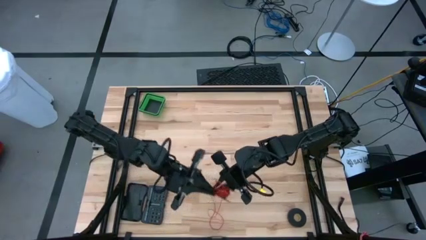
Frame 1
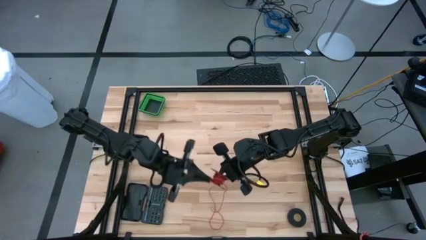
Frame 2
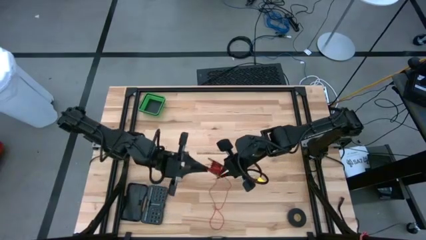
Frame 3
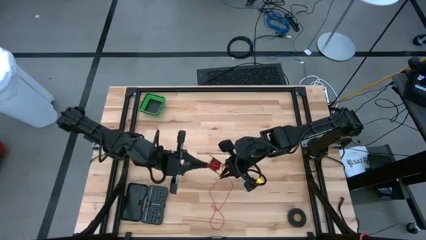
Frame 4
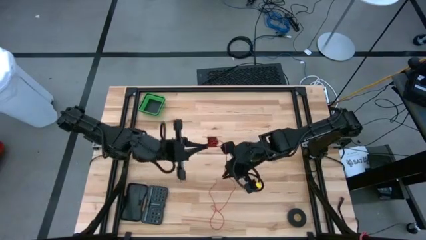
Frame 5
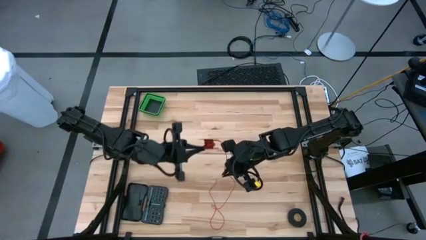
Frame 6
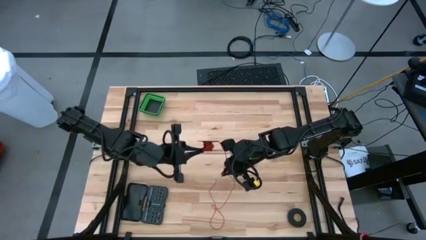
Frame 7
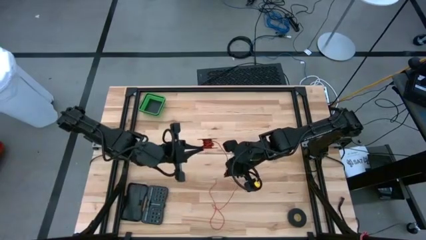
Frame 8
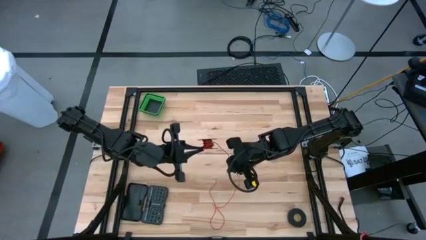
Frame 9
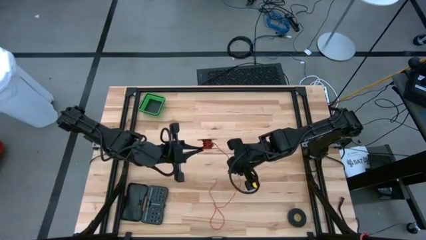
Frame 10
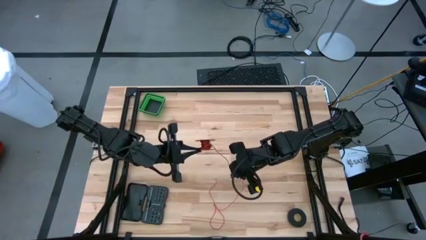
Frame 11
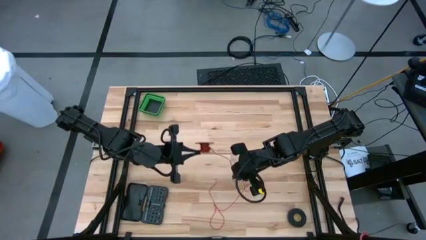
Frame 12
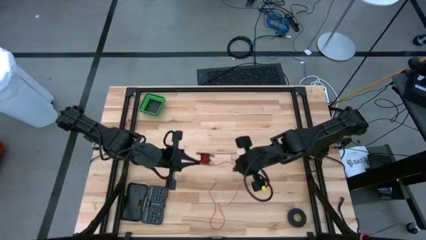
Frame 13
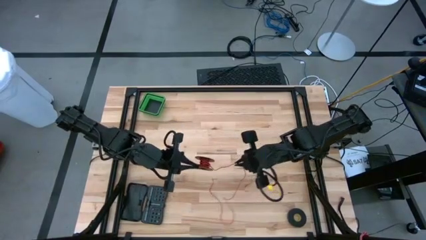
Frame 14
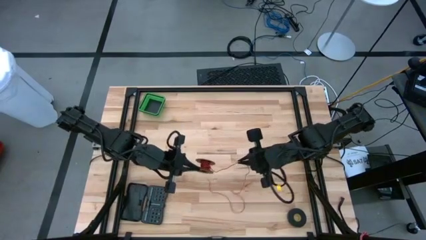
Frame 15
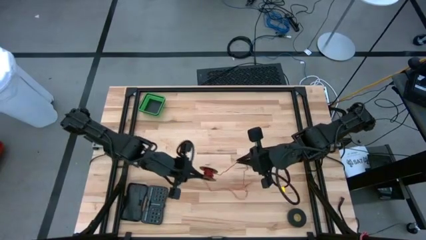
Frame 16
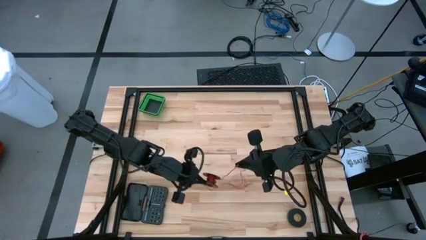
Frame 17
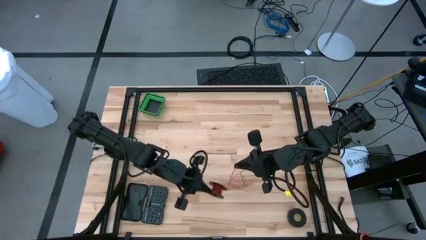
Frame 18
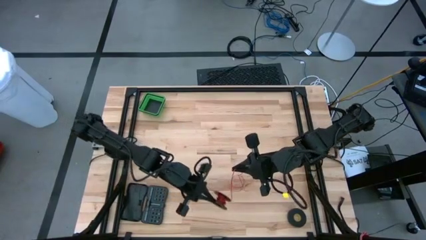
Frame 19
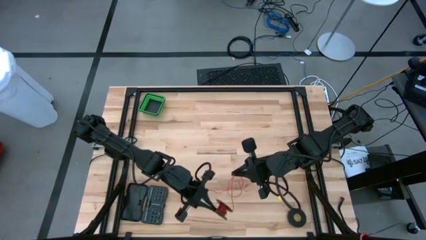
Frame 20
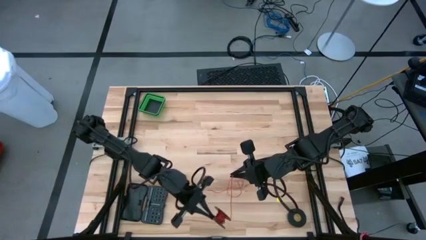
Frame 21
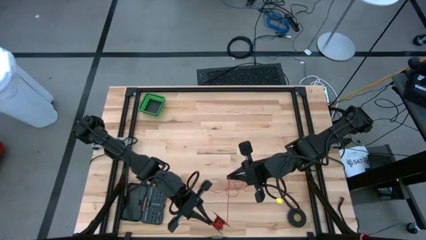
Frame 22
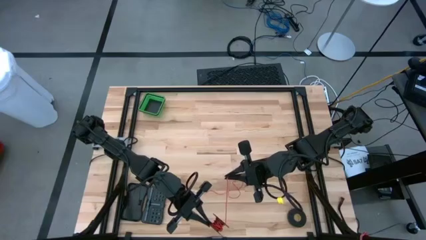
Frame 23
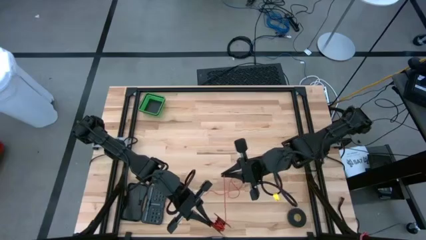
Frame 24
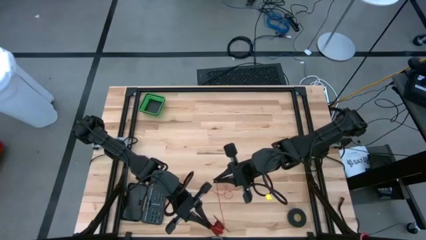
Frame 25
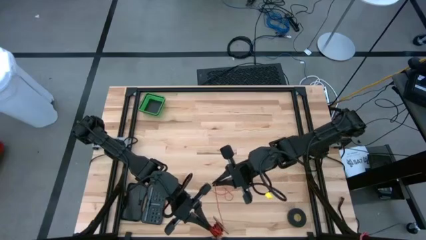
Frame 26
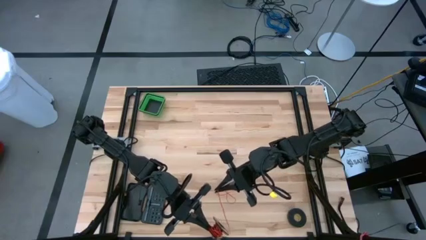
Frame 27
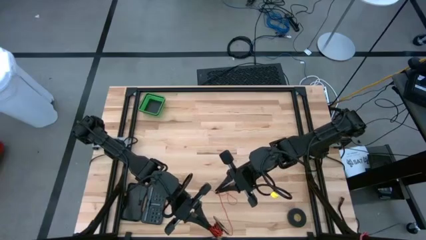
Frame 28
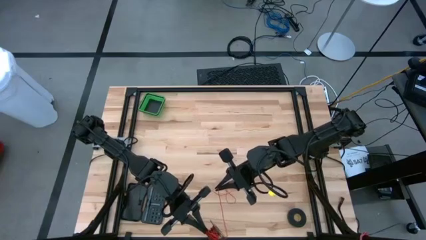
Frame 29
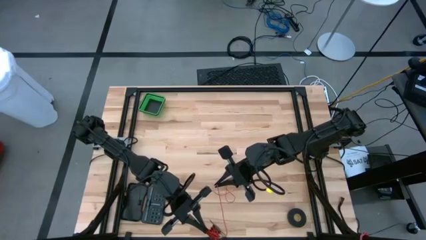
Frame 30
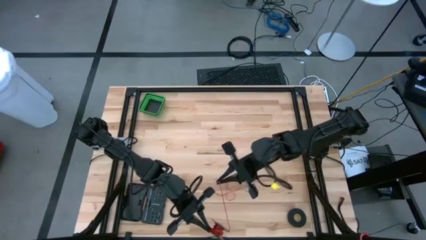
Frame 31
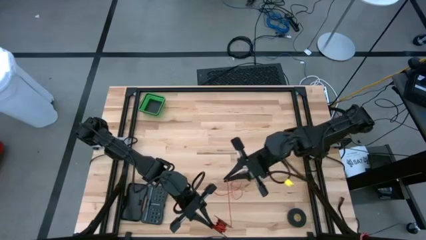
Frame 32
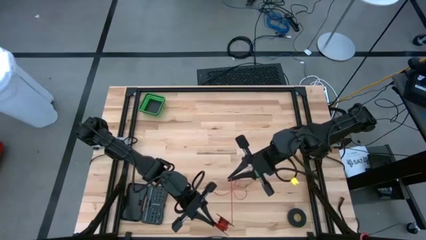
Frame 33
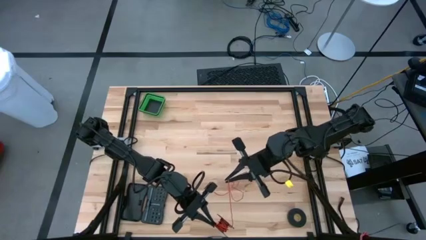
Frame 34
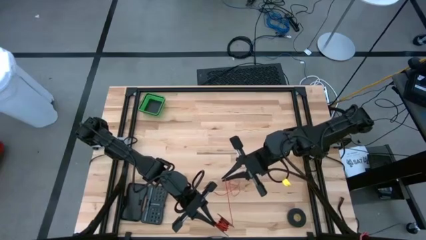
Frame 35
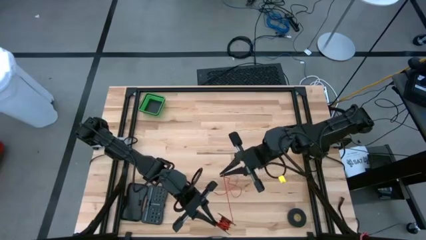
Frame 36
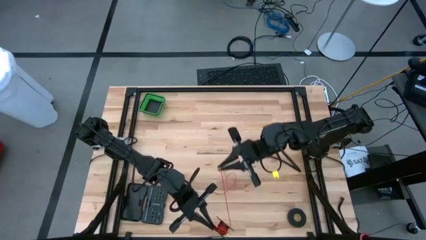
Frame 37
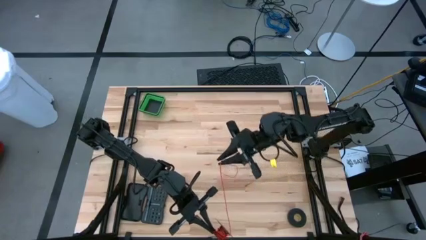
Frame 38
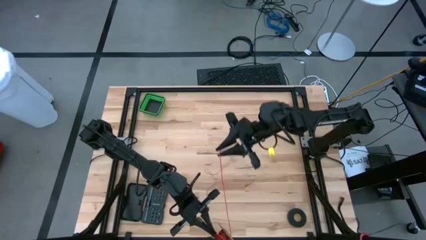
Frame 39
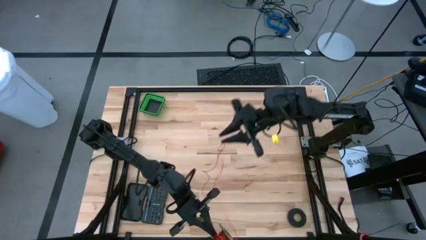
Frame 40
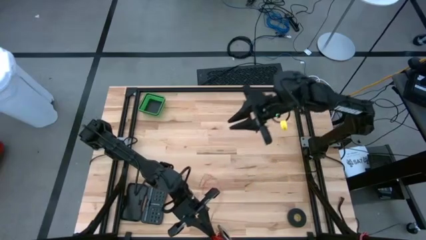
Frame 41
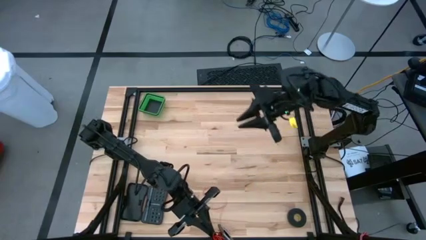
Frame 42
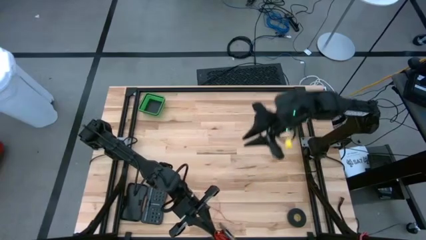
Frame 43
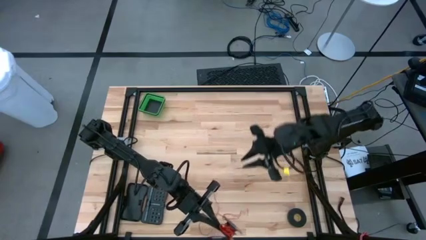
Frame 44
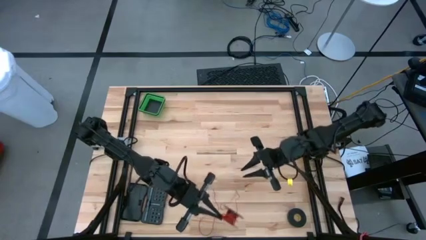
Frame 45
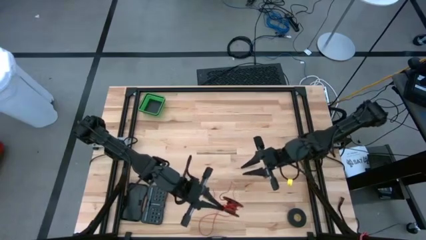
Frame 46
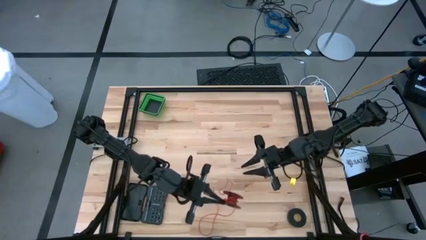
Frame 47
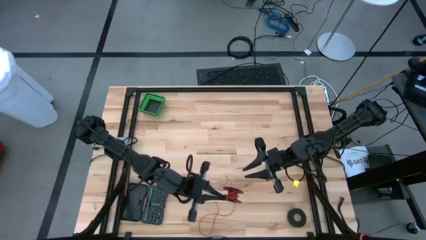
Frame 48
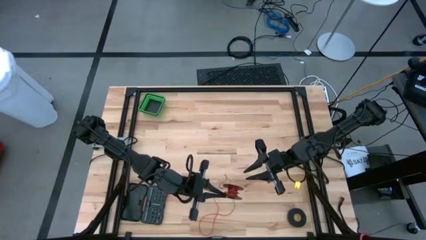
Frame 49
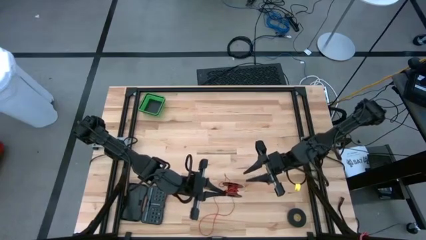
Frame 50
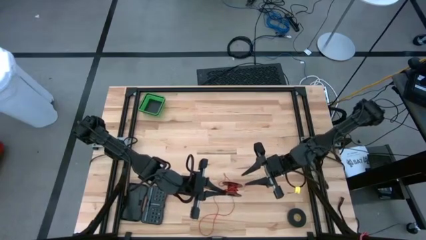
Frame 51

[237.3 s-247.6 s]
Task: Coil cords
Coil the red wire into the spool

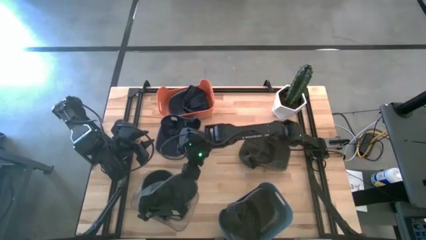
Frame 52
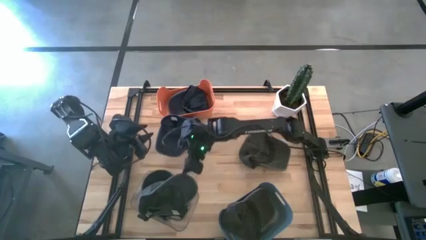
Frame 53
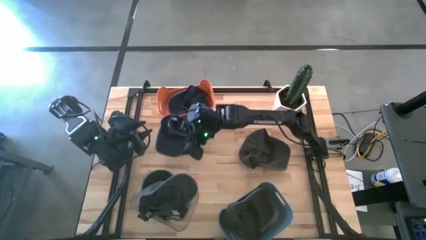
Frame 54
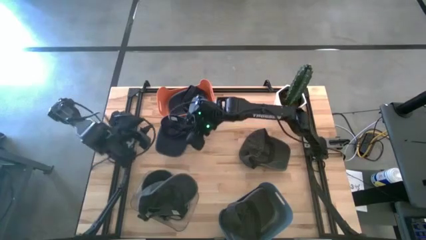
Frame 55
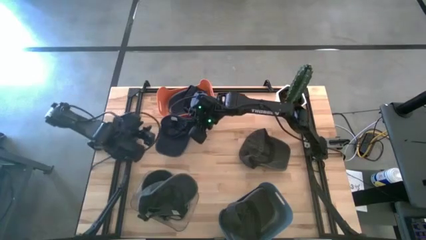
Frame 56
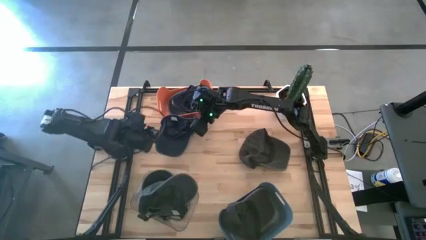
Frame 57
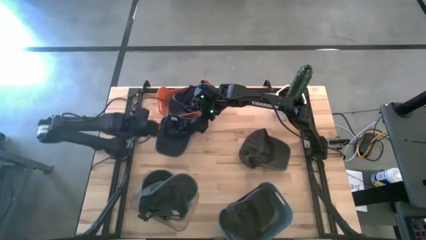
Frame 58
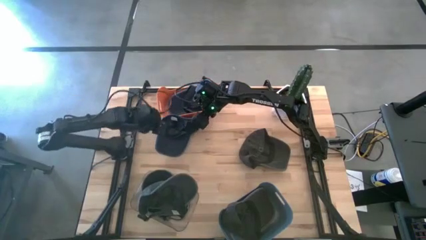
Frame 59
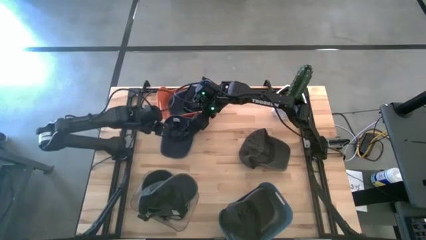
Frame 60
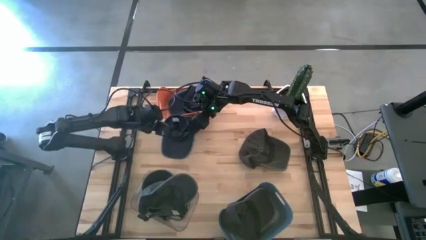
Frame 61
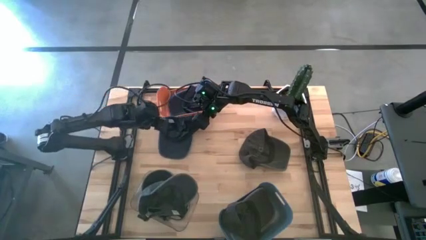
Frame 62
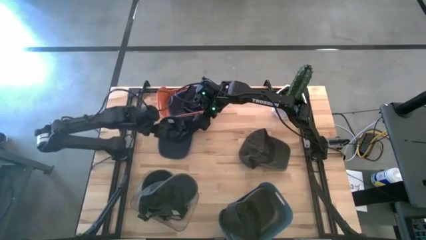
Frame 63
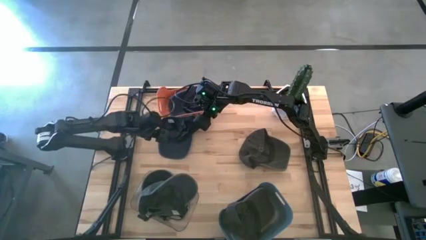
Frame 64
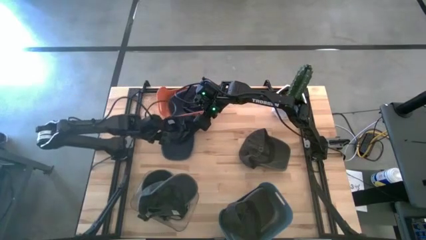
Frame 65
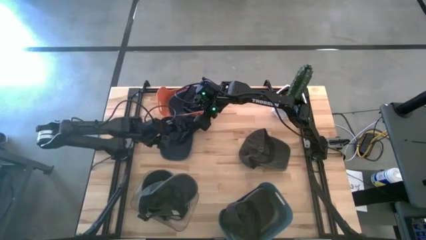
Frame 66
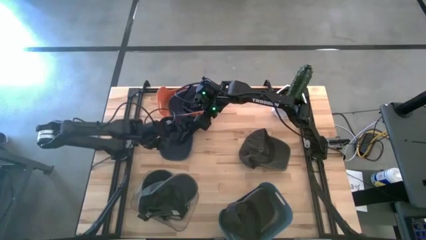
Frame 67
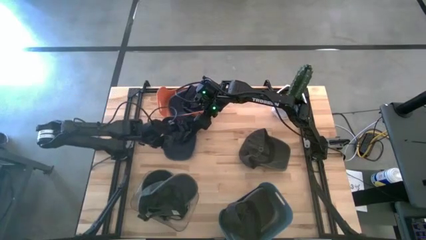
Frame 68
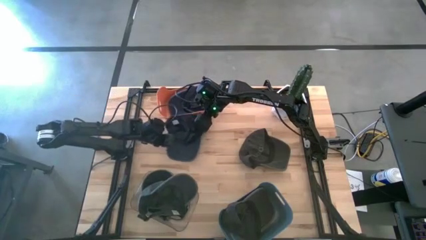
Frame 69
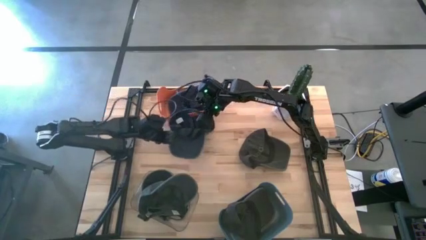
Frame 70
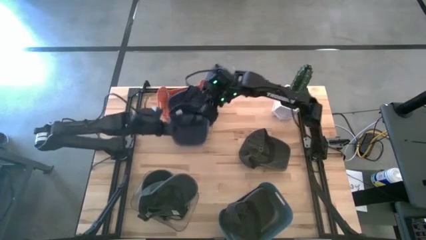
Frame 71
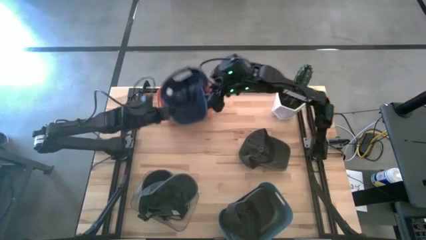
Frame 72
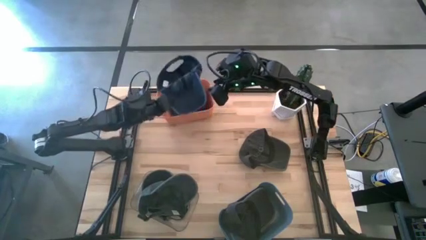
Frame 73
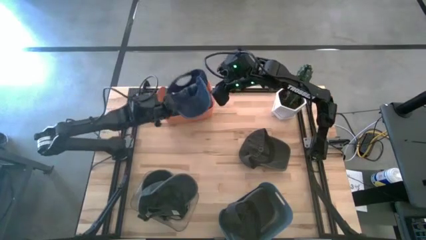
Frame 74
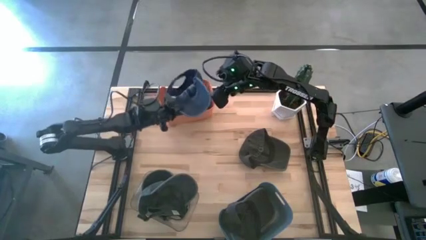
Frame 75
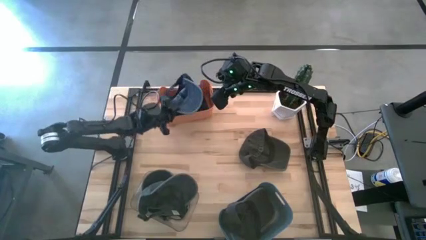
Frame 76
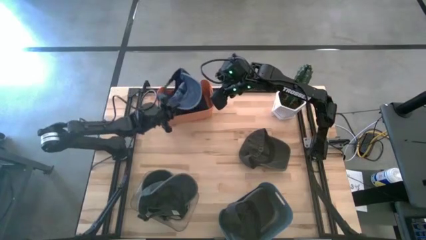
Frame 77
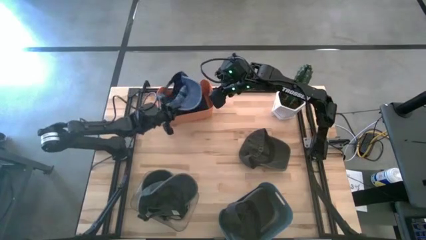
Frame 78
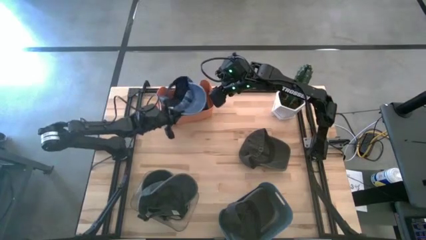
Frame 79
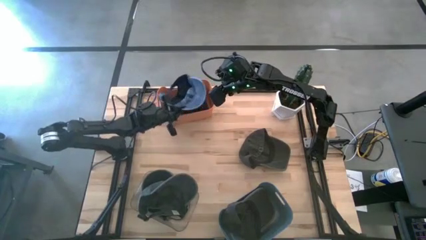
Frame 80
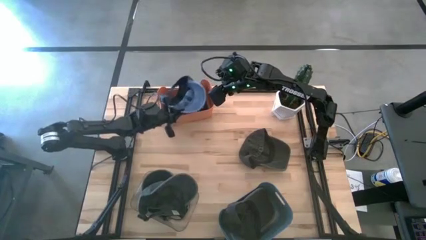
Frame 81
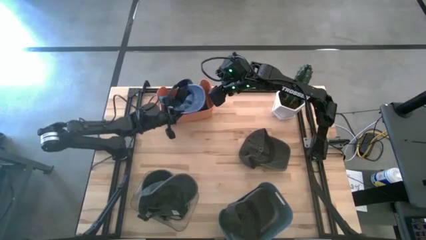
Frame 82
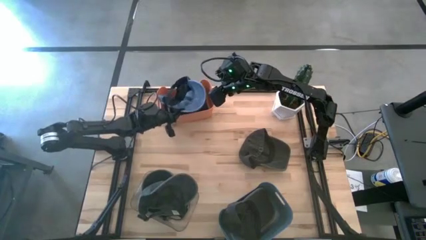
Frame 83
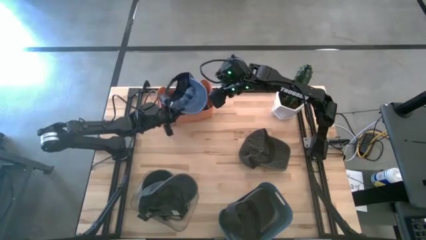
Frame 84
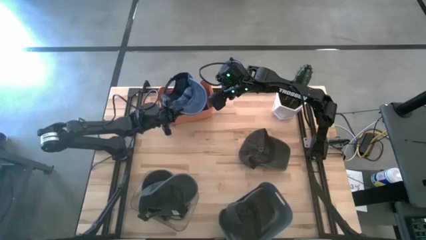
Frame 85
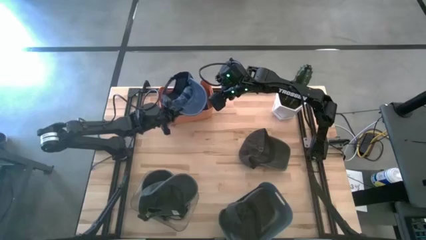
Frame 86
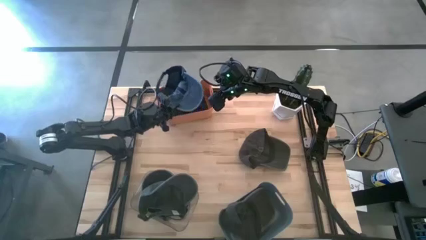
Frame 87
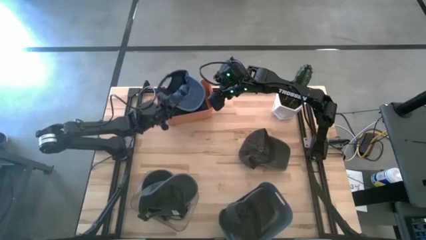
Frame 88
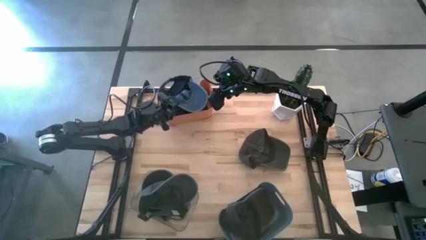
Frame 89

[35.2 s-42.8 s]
Task: Pick & Place hat
Put the blue cap into the orange bin
